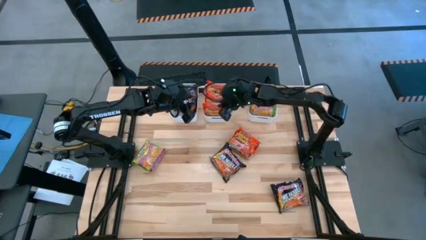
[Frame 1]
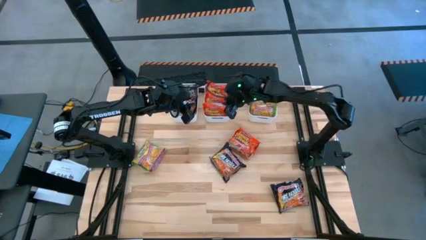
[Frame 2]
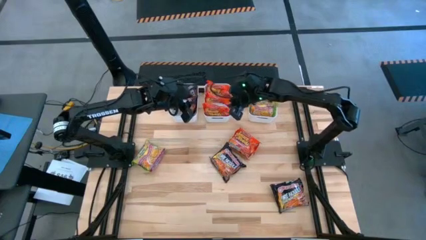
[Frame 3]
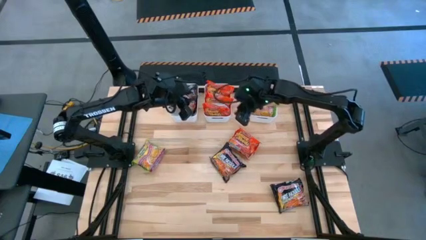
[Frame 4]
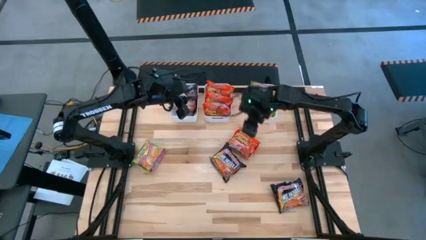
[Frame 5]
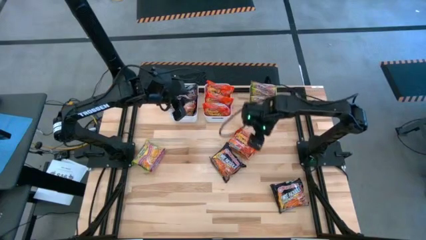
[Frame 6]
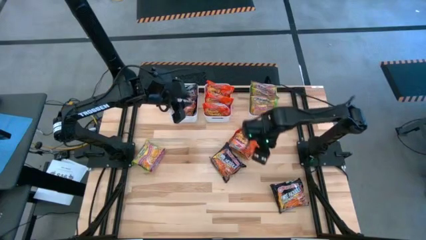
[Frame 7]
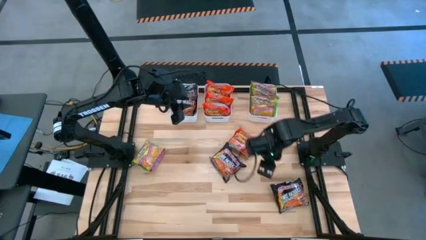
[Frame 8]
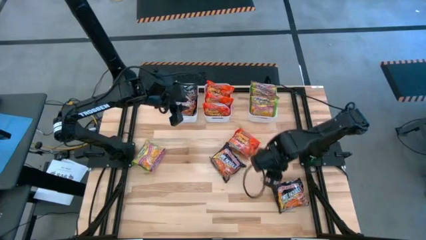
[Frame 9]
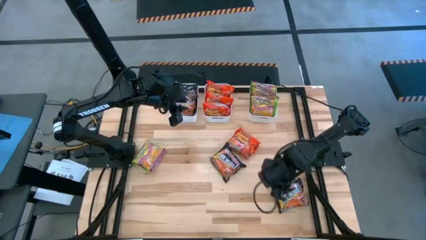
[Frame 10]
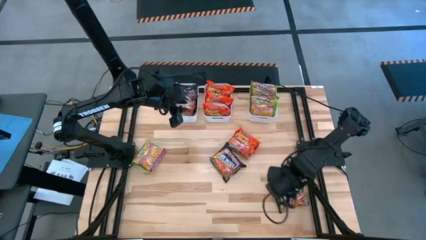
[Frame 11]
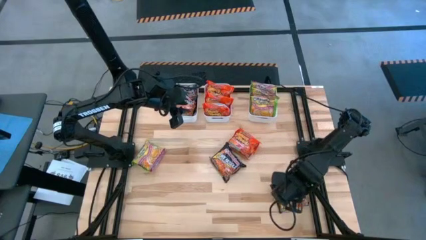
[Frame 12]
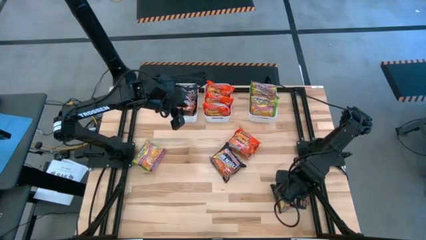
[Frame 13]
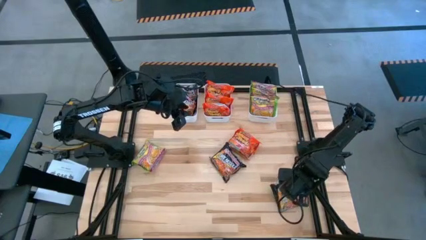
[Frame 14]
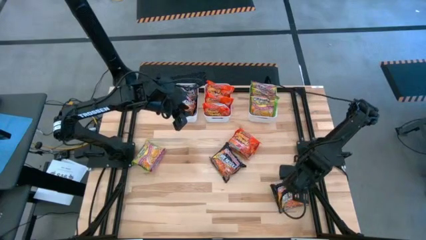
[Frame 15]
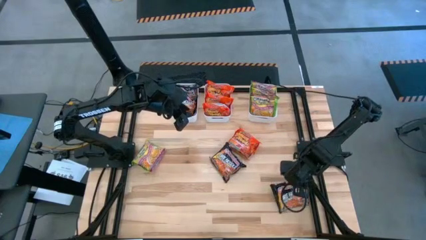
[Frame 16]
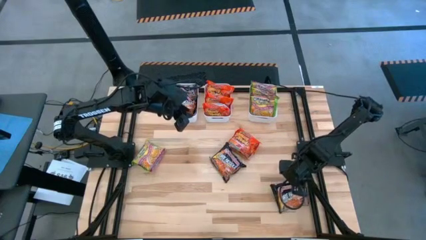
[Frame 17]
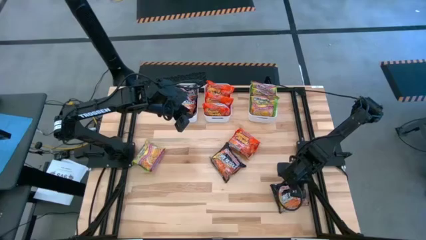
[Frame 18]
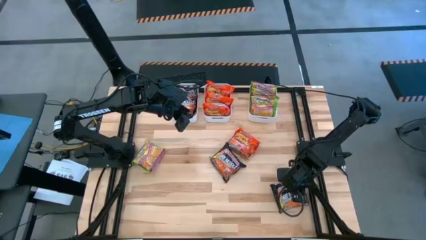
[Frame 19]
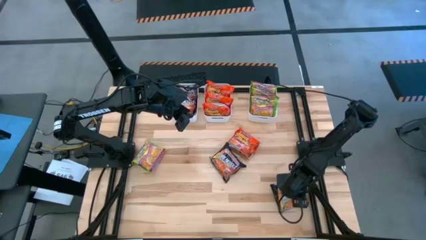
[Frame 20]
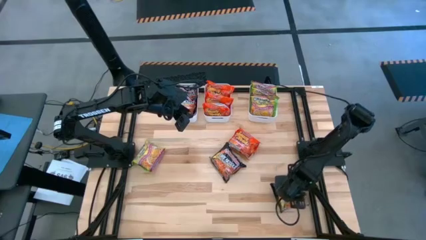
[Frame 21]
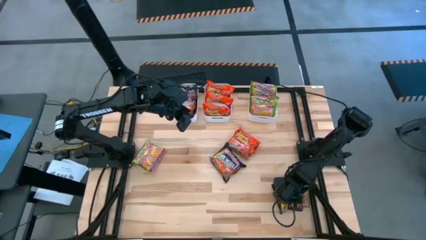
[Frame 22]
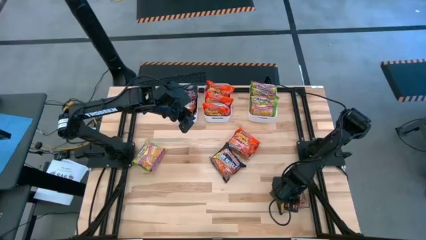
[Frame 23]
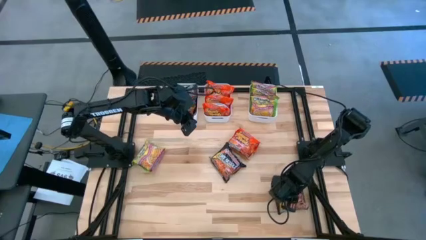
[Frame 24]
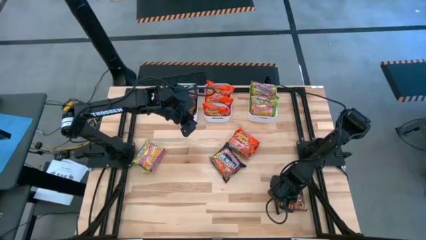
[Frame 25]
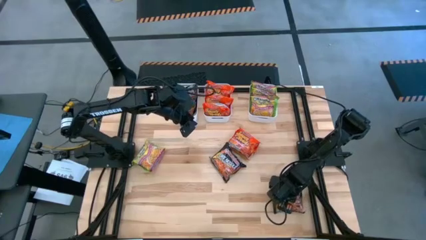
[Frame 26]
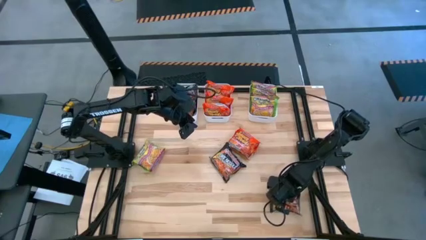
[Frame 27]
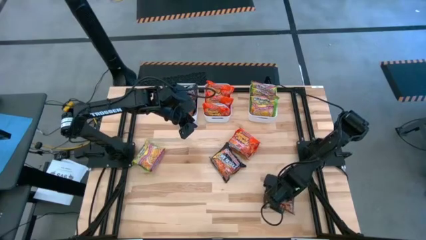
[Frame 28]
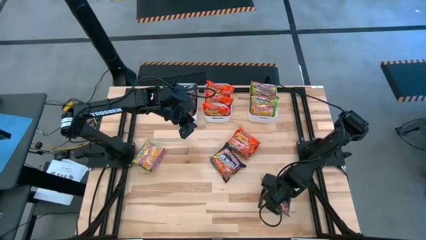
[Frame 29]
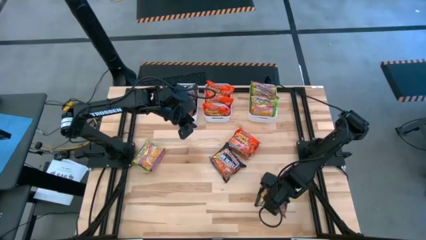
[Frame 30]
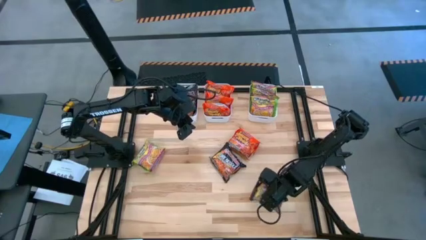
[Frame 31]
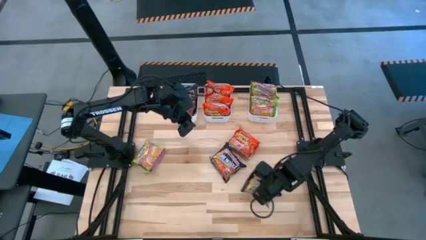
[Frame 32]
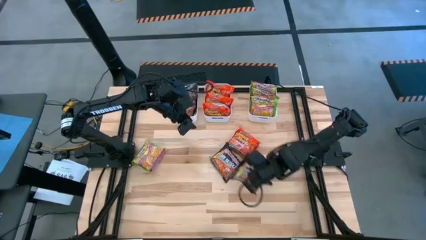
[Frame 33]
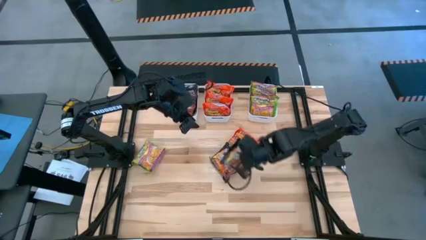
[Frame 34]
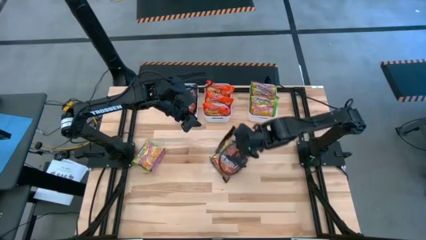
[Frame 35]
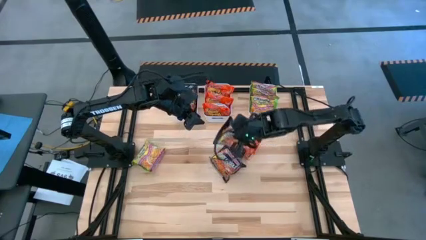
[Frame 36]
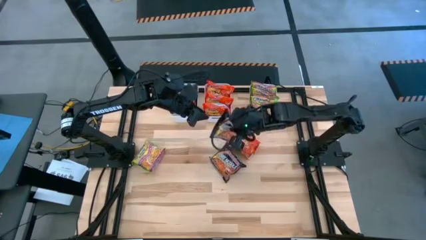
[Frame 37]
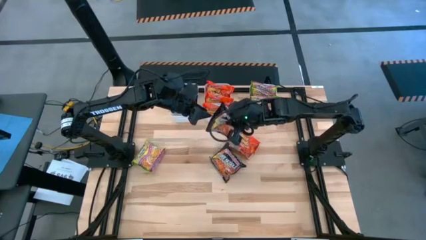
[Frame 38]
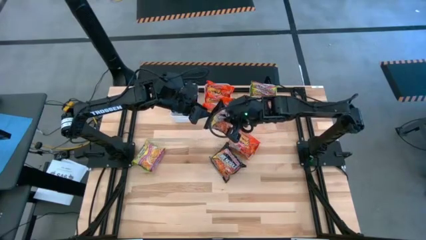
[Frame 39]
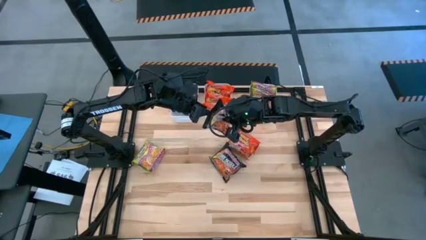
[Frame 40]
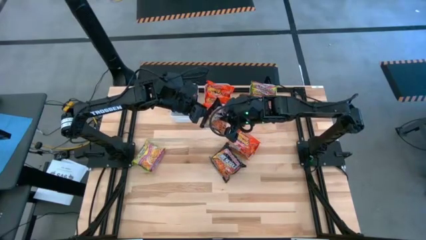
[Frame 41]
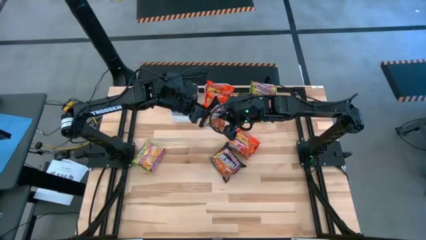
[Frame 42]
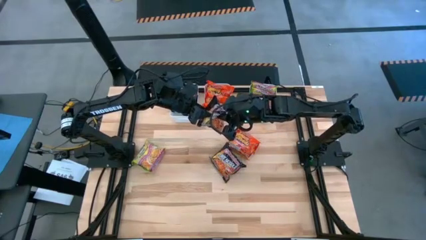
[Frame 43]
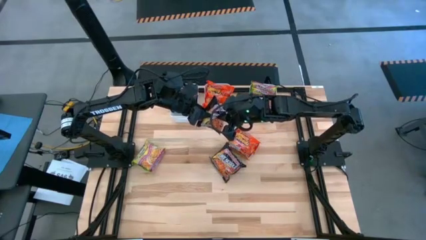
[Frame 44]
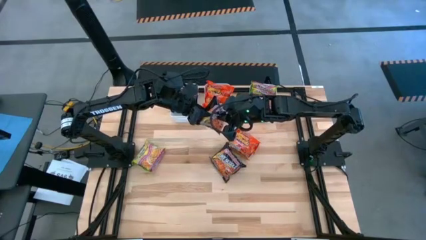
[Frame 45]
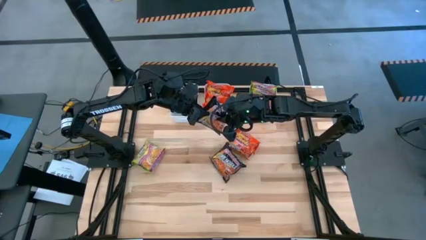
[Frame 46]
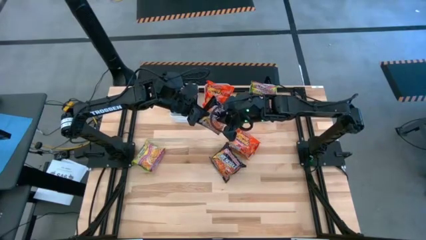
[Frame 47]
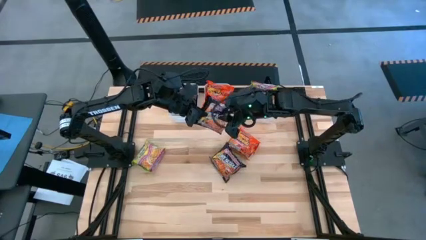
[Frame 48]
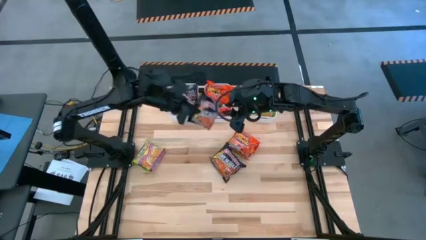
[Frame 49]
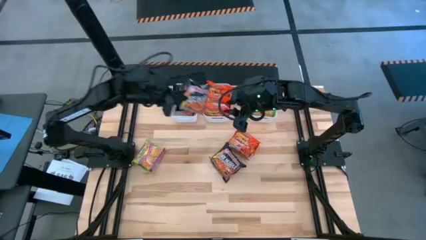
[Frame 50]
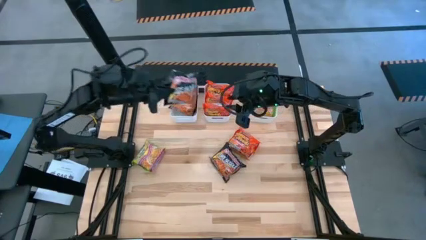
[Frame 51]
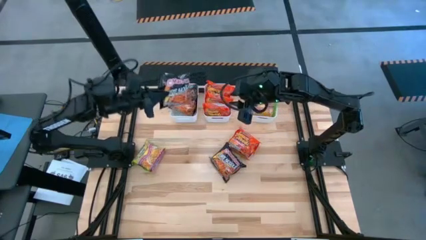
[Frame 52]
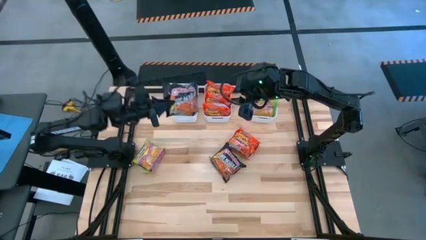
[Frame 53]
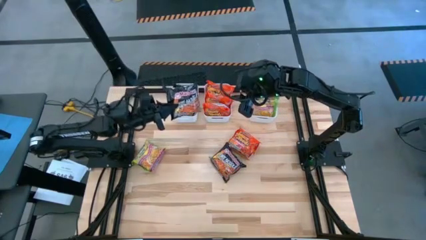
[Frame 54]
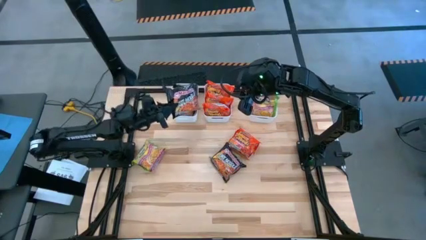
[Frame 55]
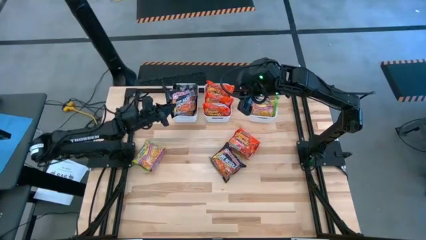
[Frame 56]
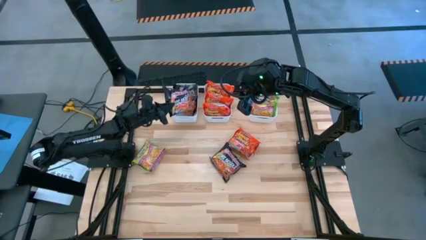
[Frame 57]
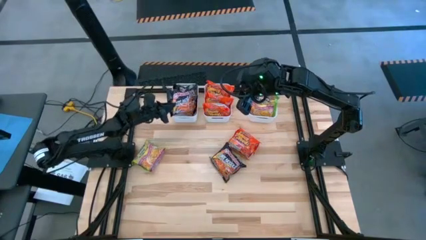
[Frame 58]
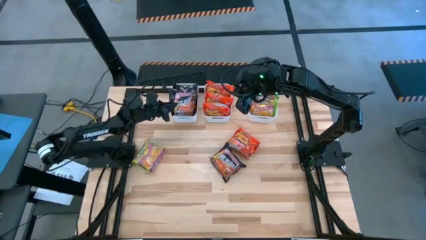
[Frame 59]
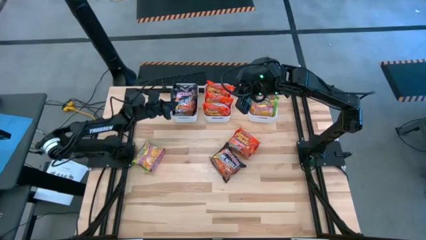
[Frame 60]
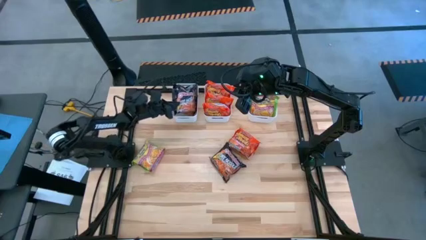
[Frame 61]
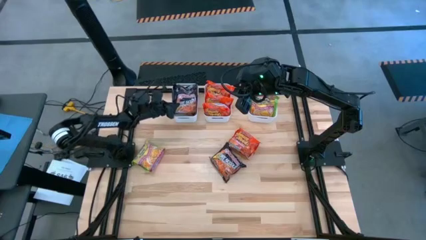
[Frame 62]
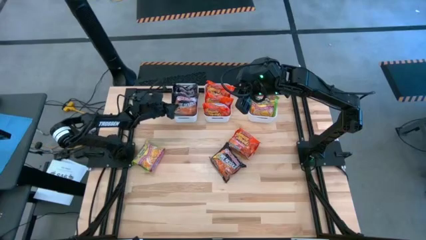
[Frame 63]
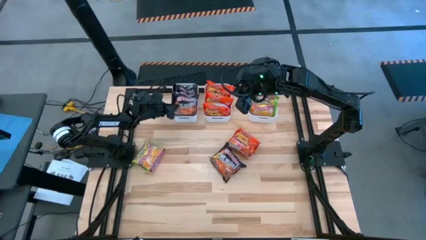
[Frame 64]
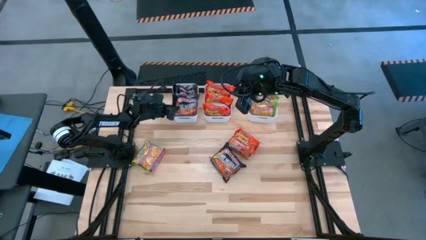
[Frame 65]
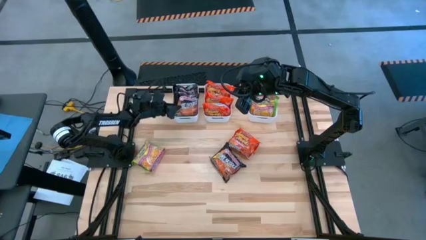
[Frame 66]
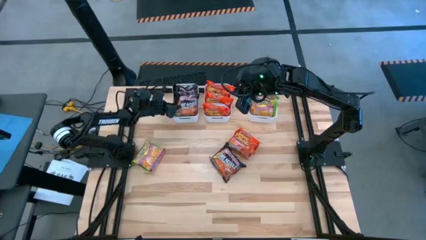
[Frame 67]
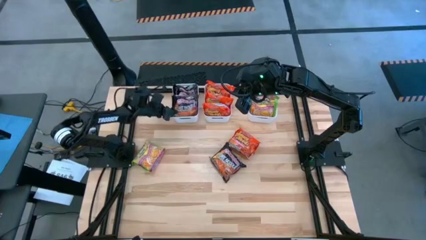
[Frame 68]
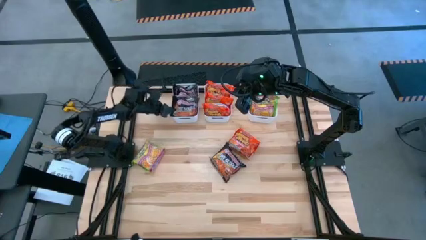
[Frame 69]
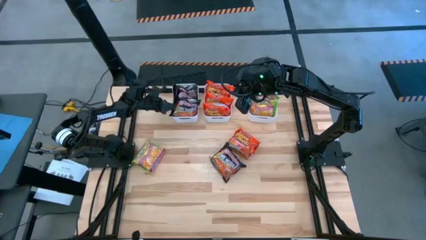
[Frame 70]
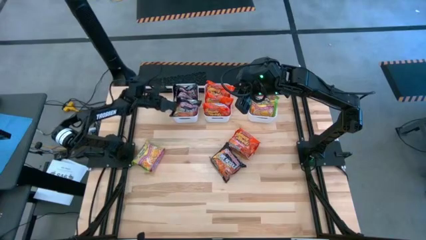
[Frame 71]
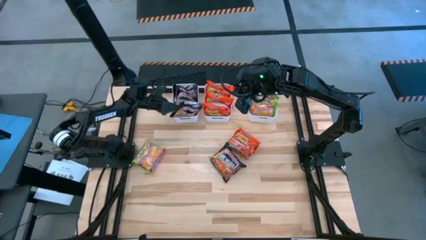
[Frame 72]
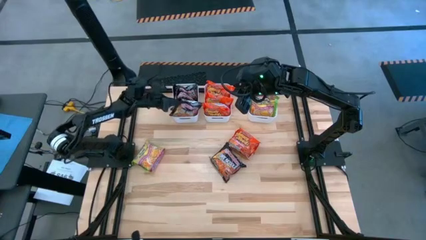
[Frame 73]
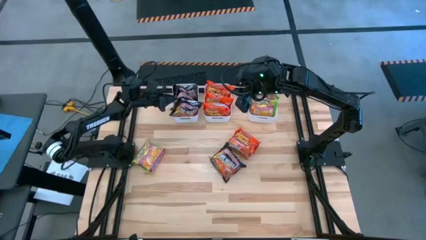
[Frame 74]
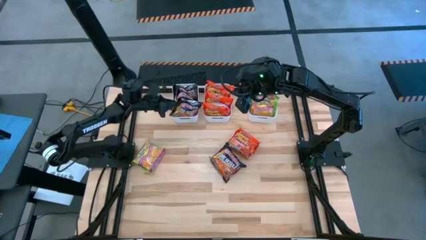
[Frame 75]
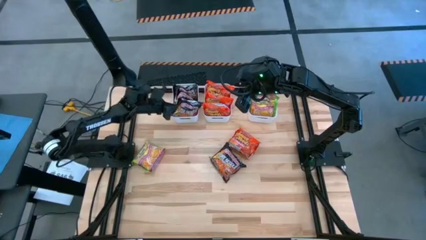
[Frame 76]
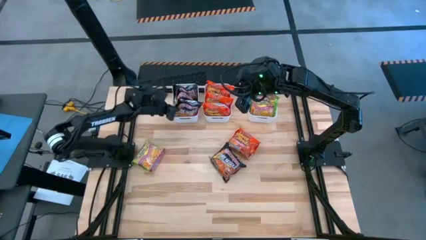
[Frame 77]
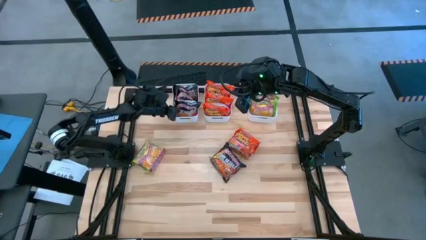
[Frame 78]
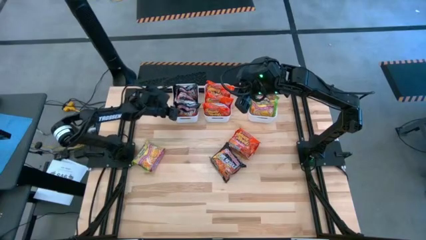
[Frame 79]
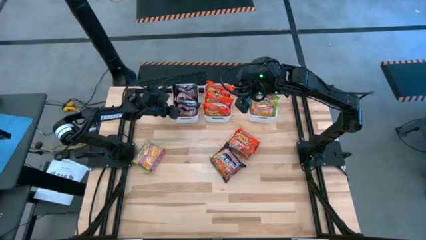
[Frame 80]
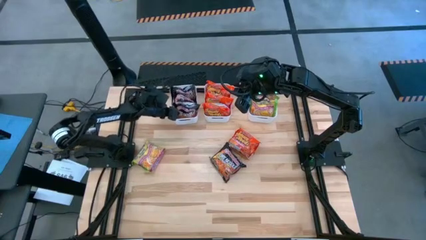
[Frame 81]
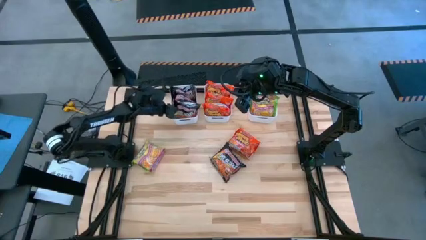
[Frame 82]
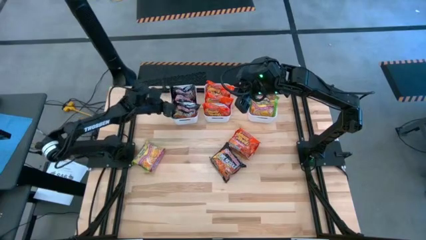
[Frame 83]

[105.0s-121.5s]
Task: Sort Maruchan noodles
Put the black noodle pack into the left white bin
